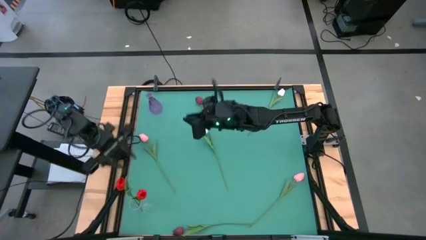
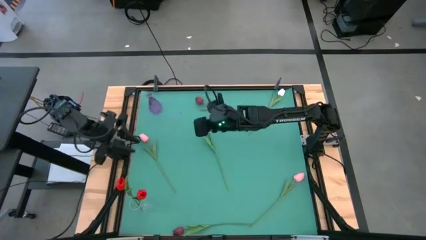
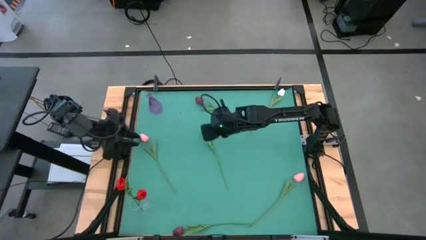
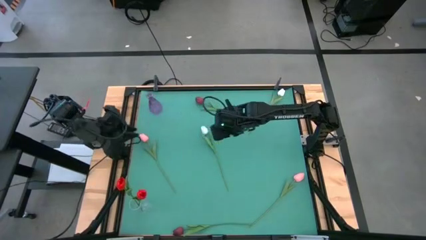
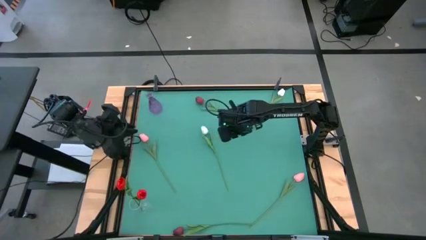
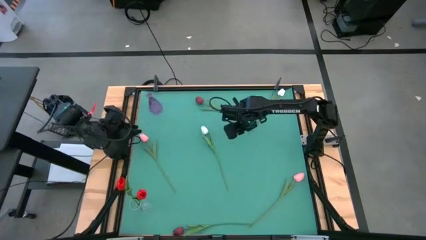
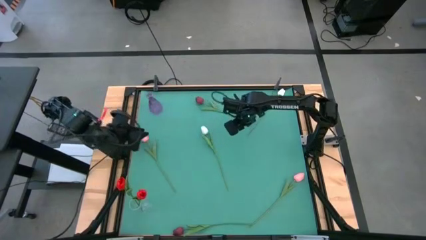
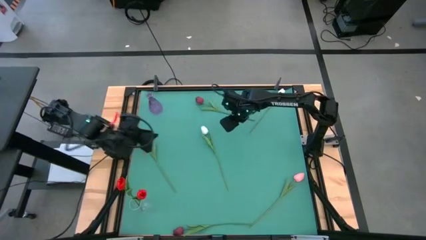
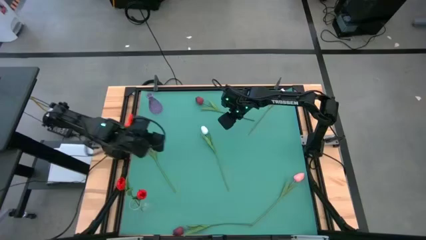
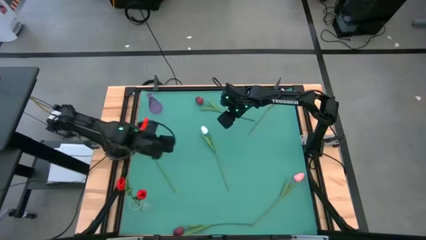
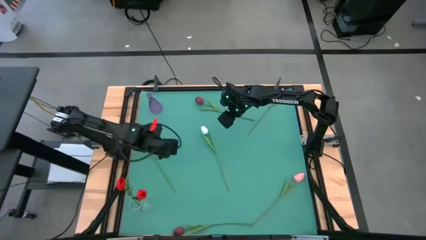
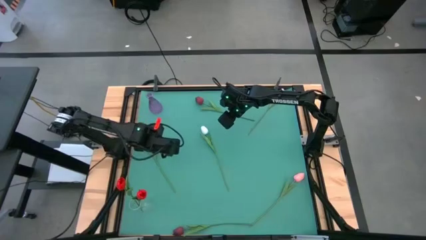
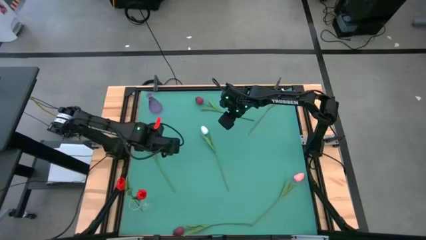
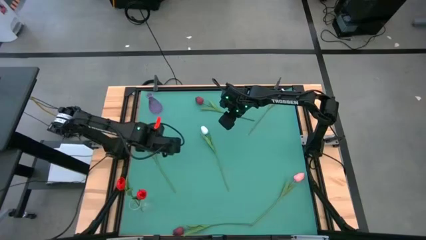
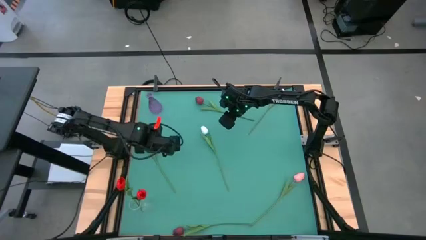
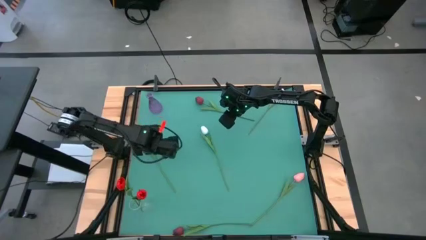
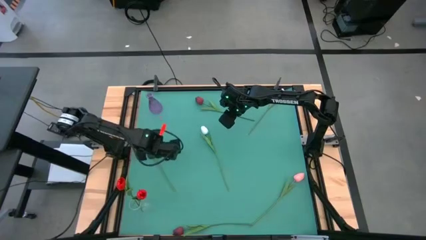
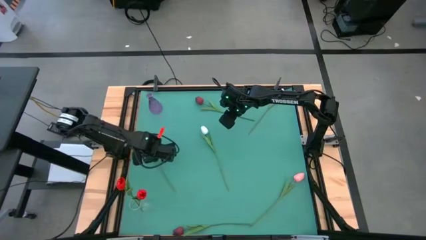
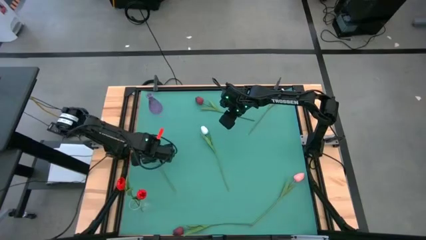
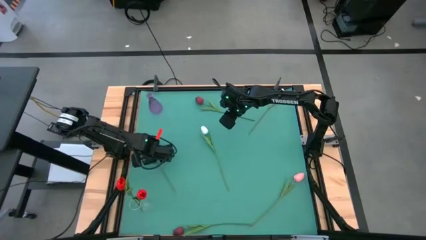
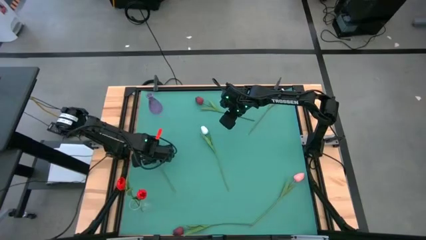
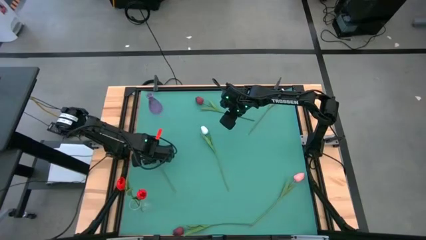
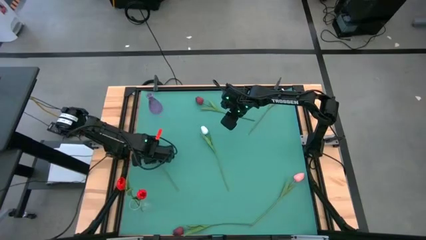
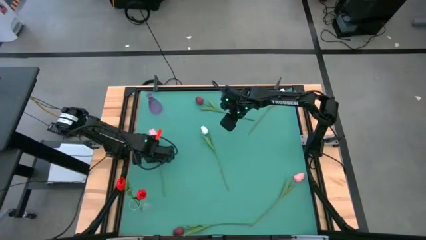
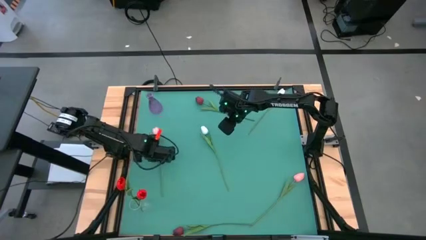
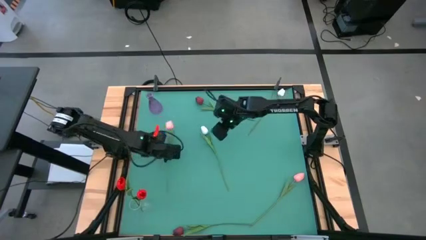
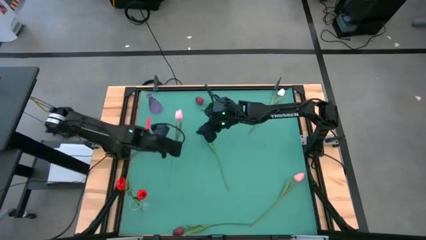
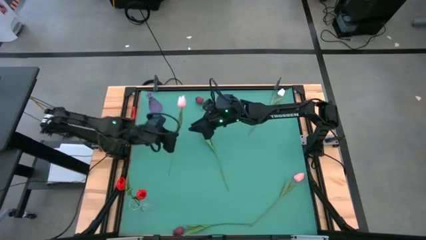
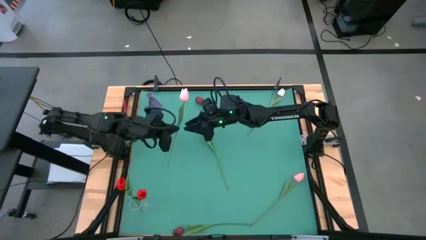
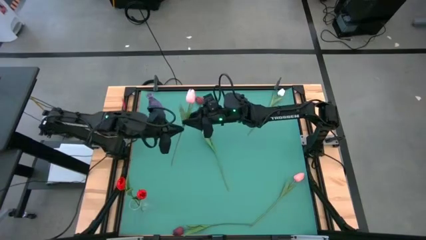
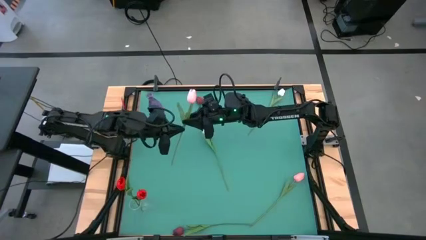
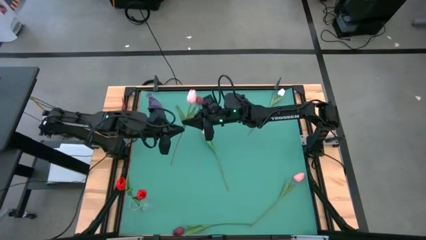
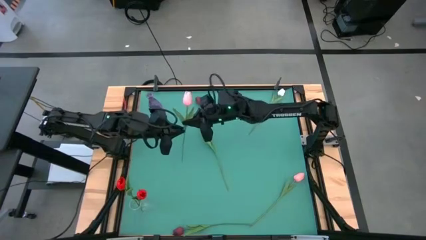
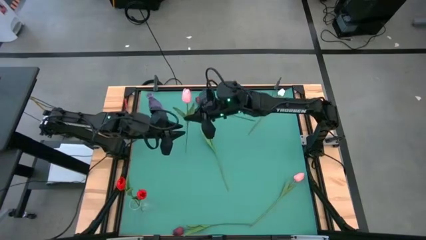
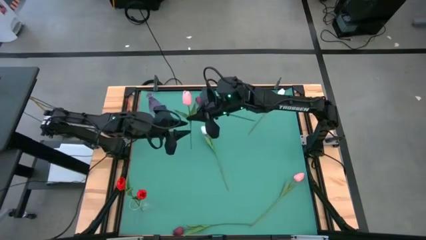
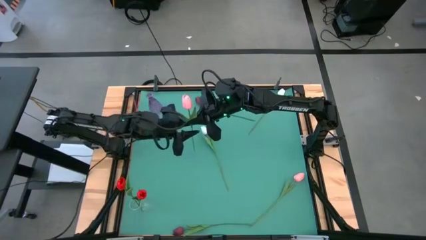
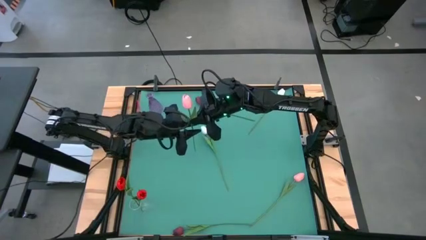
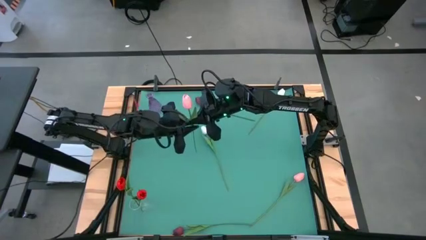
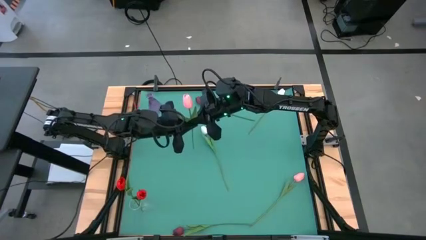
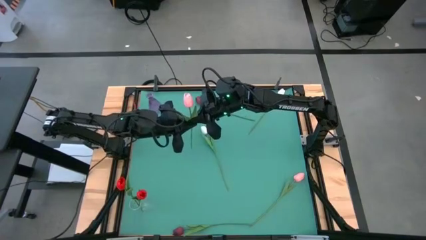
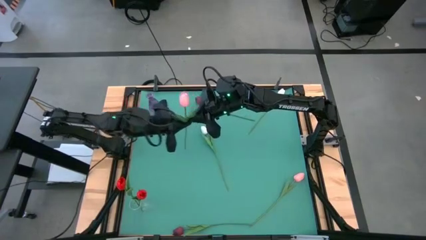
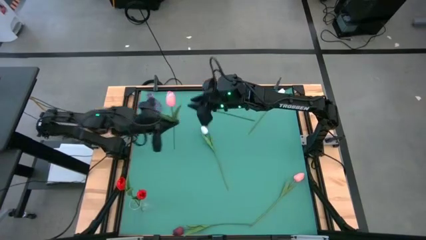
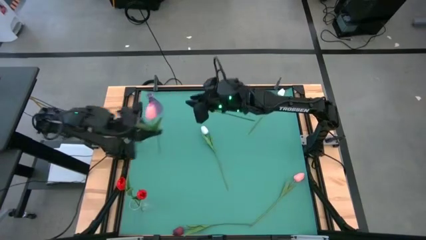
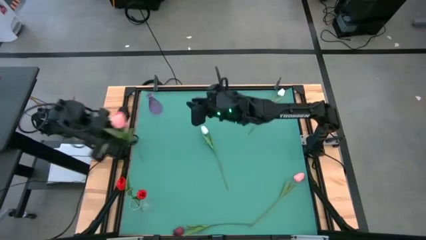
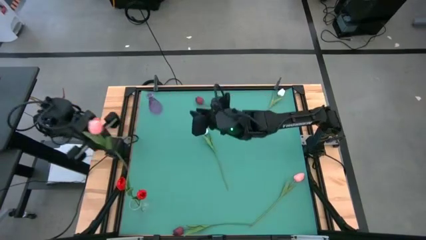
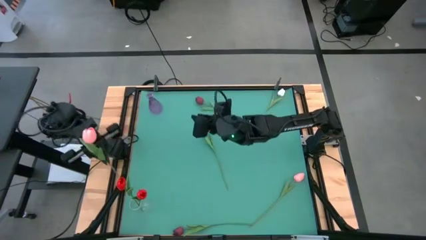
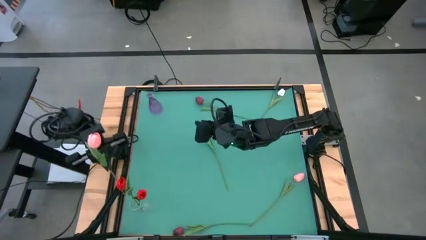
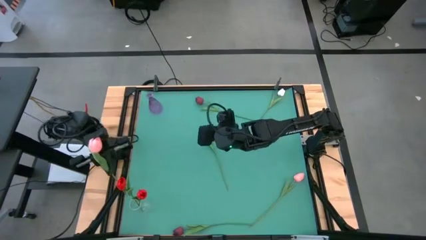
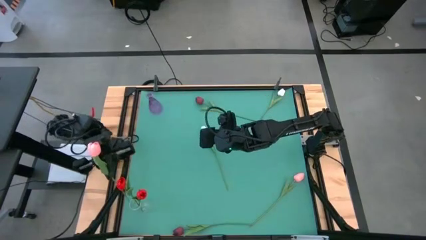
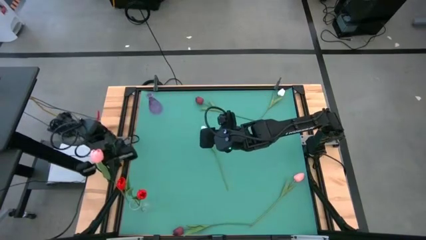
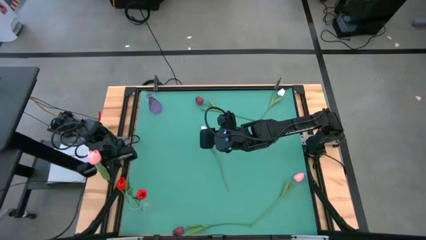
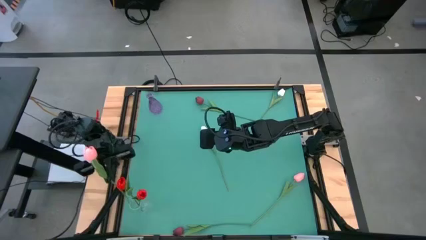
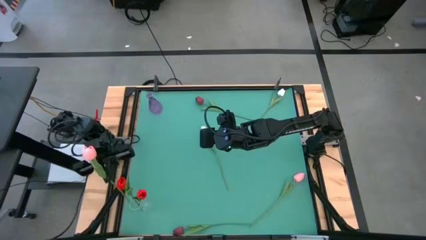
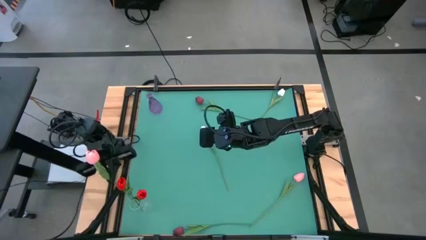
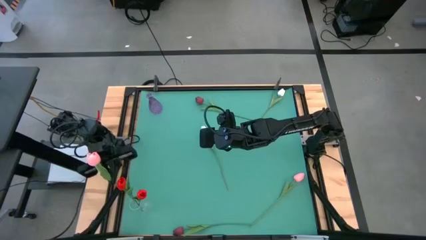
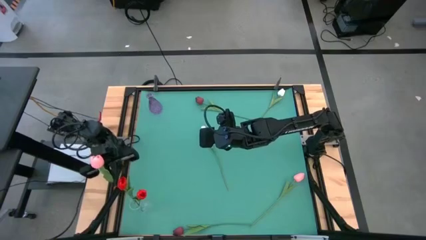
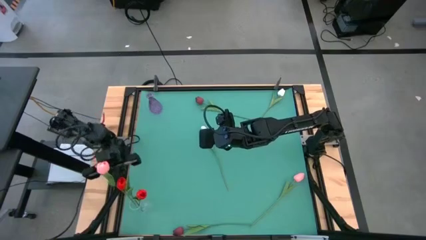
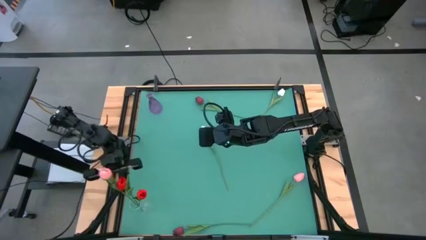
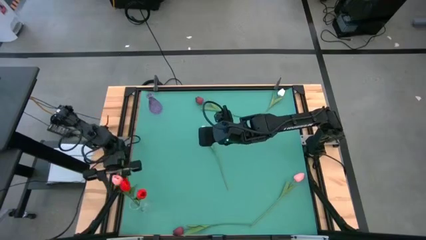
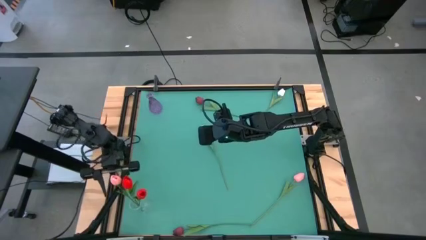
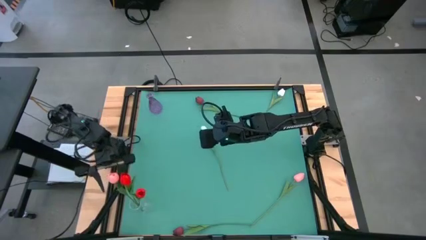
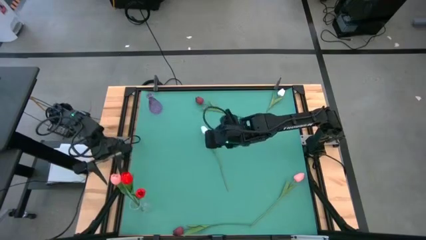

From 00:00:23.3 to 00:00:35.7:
Task: Sort flowers into vase by color
Put the top pink flower into the transparent vase

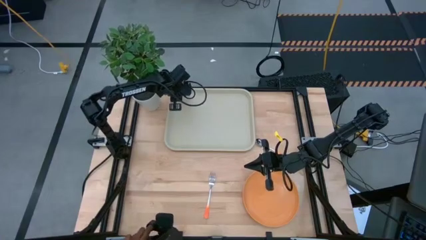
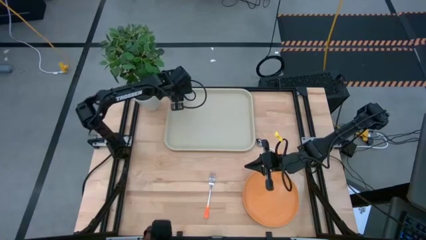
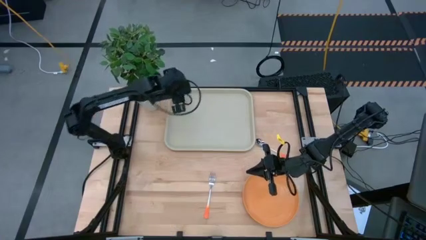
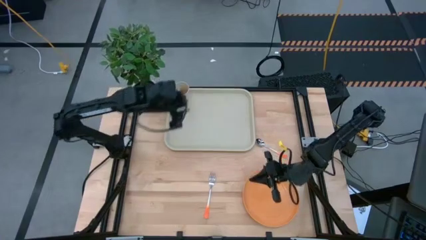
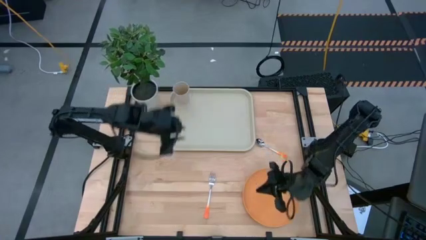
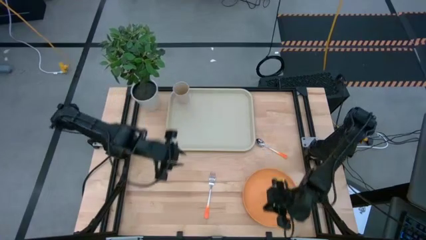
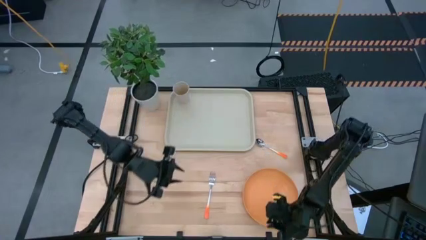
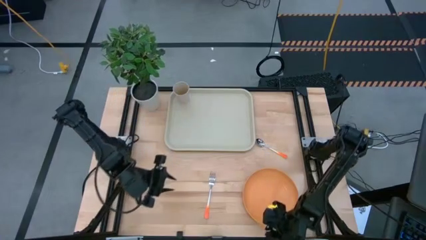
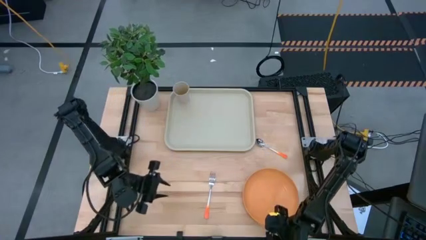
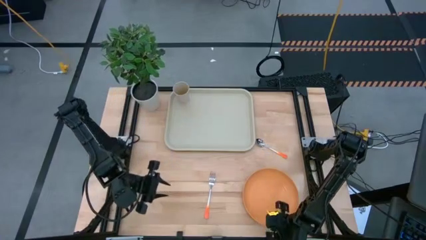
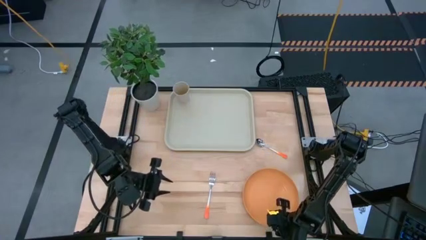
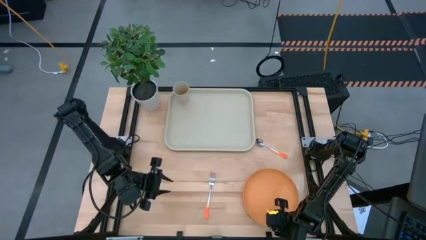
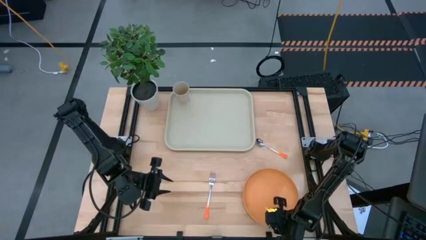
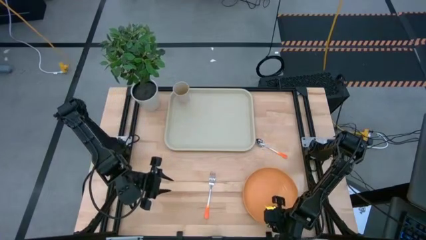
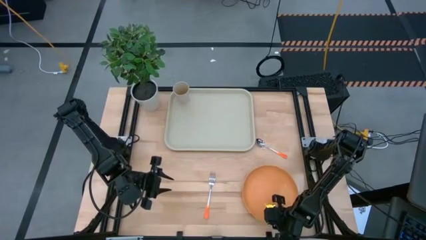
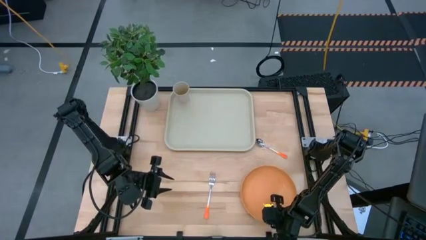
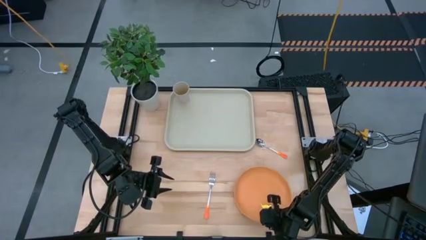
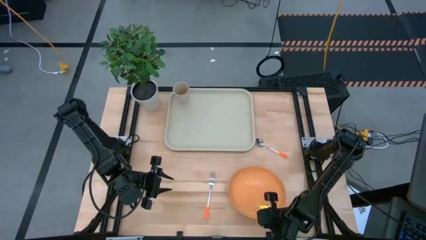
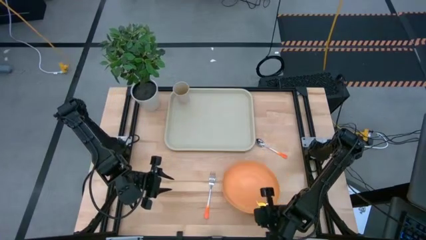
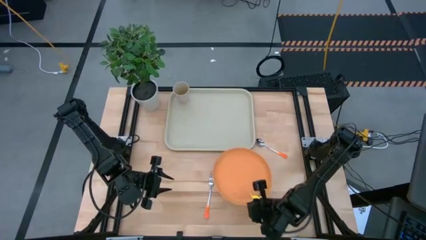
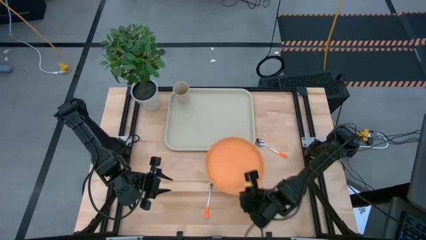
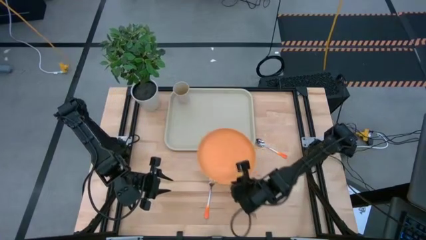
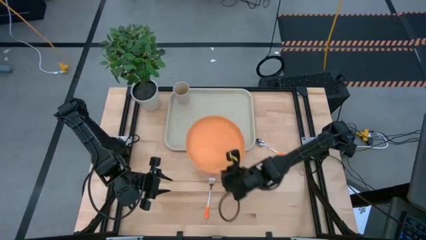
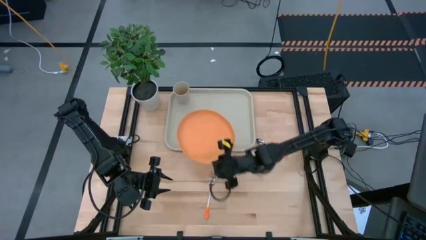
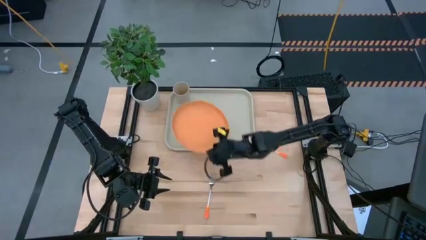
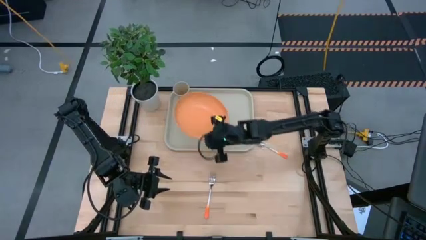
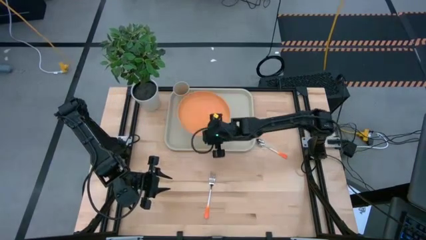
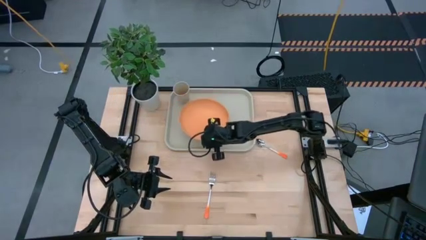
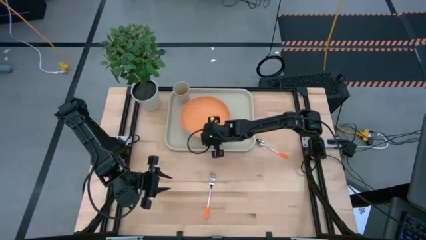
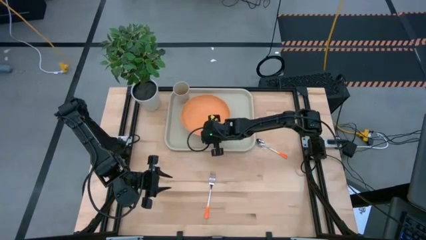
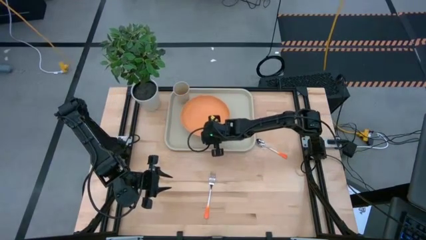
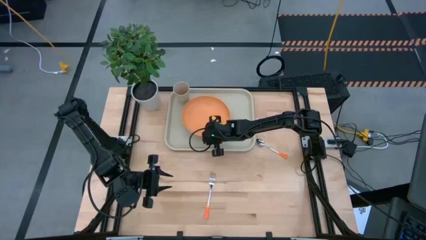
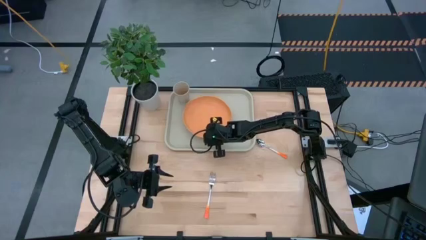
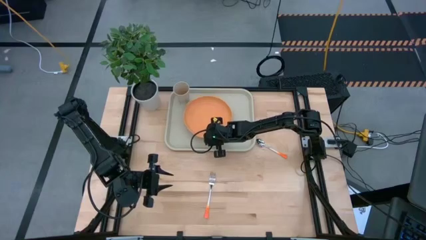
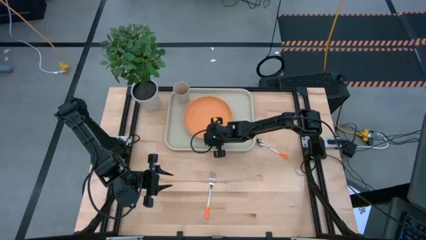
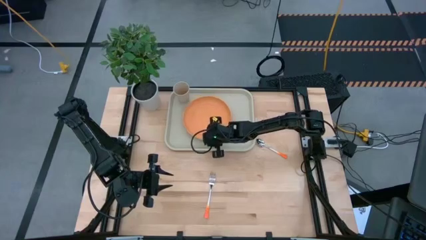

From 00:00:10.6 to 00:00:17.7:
Task: Pick and place plate/cup/fork/spoon on tray
Put the orange plate on the brown tray
